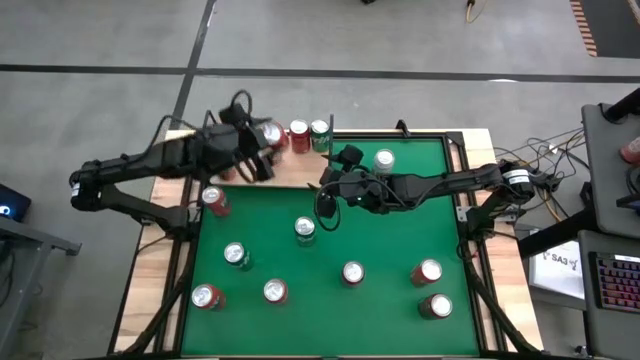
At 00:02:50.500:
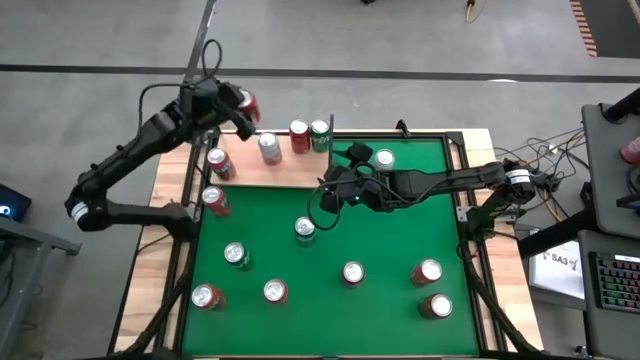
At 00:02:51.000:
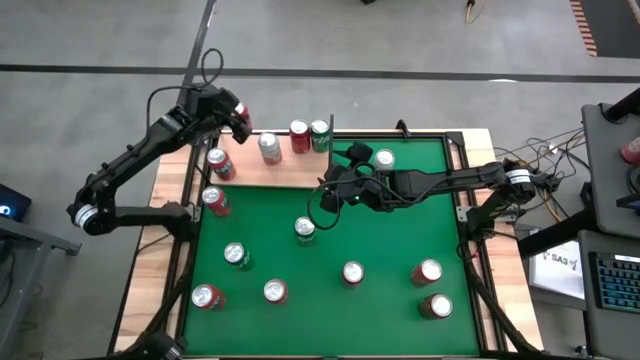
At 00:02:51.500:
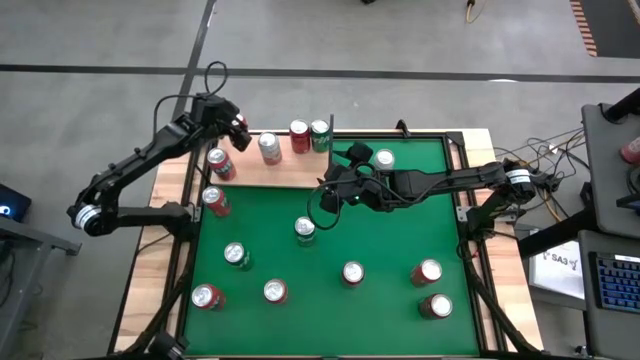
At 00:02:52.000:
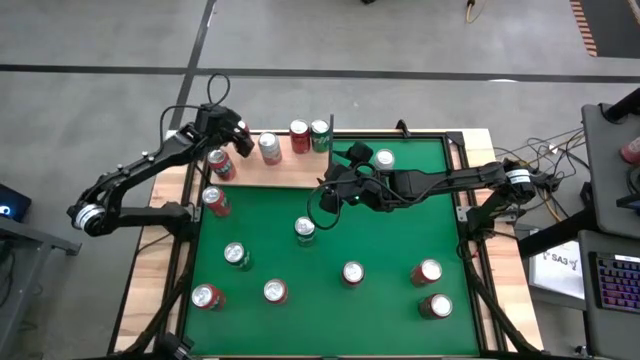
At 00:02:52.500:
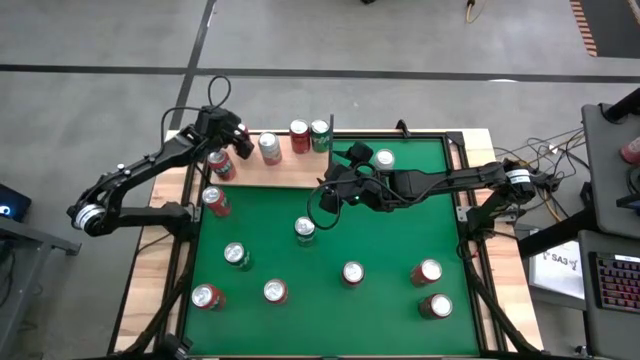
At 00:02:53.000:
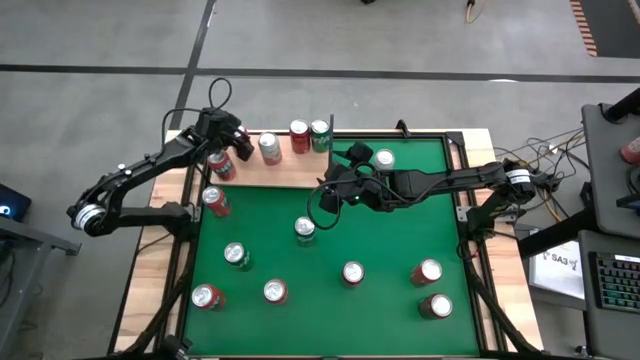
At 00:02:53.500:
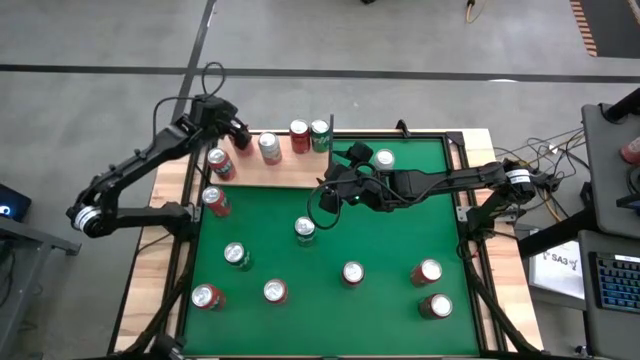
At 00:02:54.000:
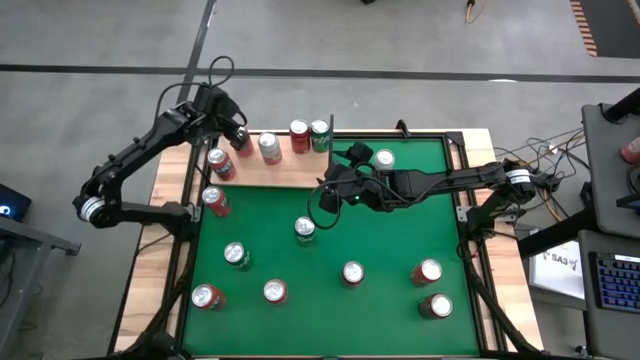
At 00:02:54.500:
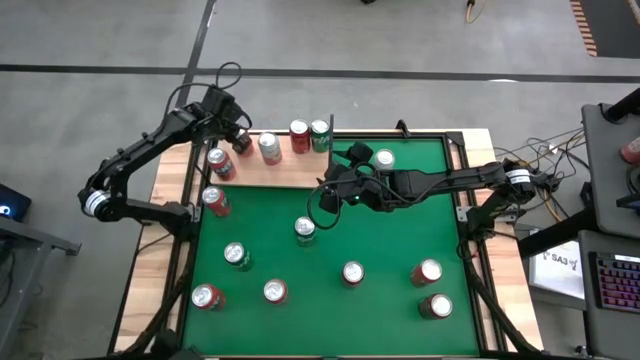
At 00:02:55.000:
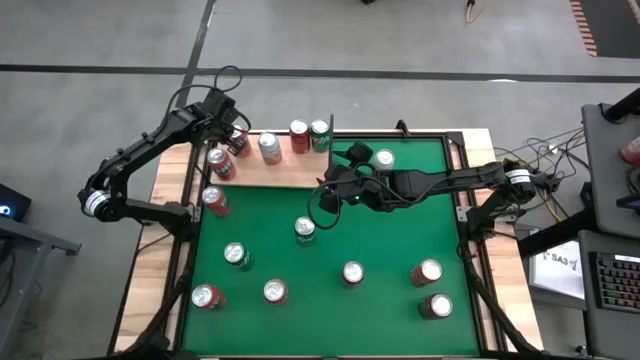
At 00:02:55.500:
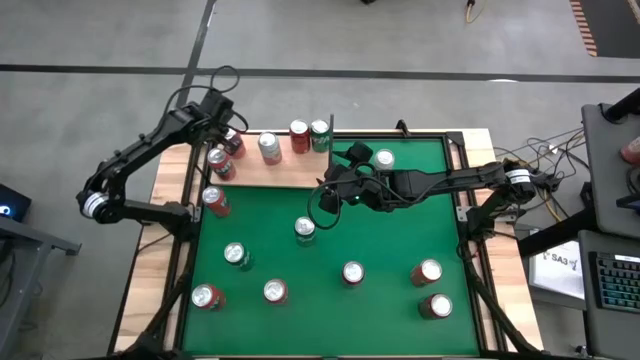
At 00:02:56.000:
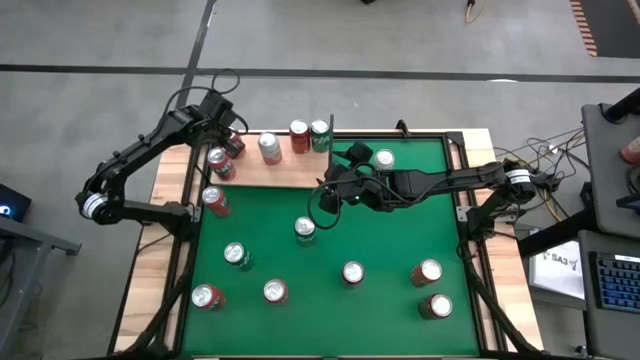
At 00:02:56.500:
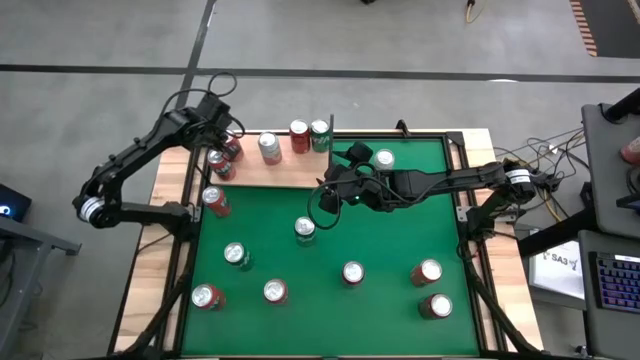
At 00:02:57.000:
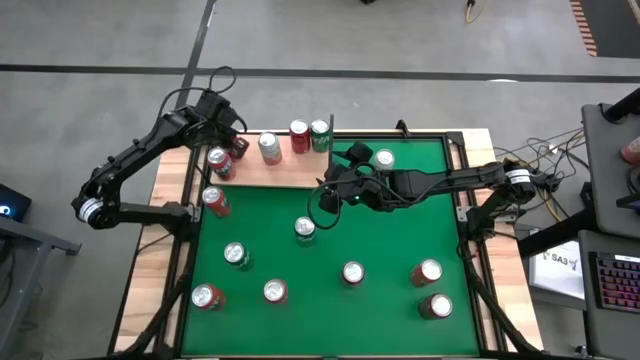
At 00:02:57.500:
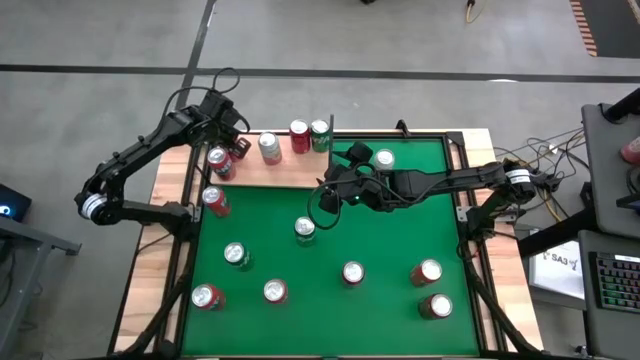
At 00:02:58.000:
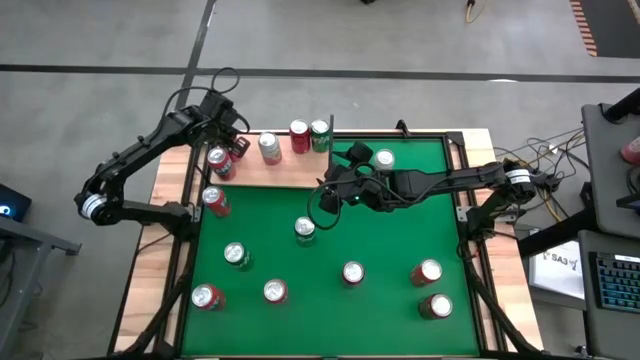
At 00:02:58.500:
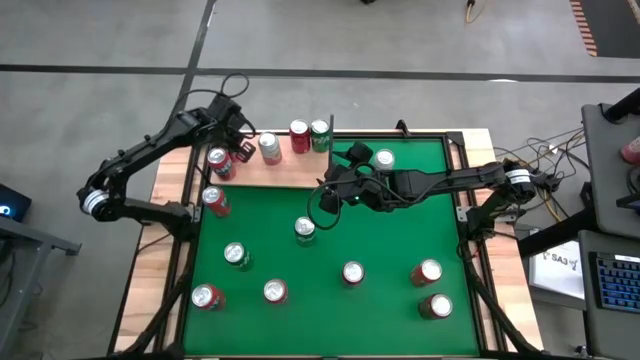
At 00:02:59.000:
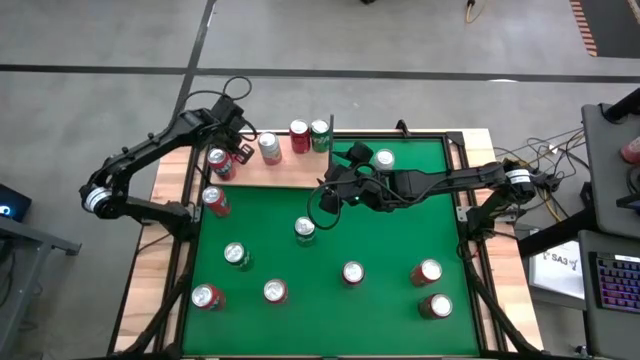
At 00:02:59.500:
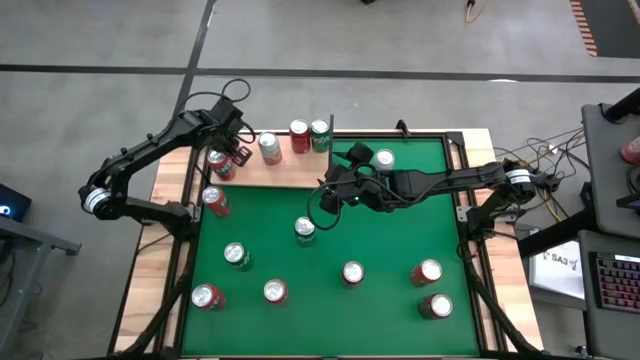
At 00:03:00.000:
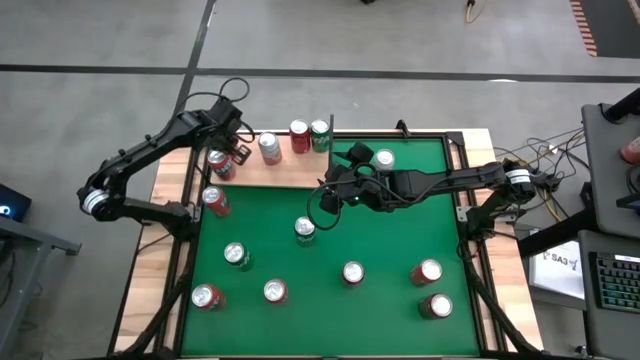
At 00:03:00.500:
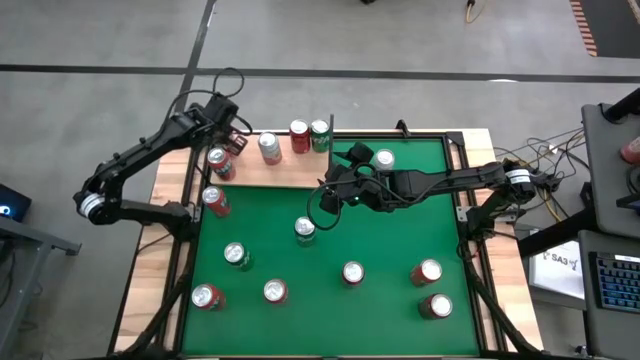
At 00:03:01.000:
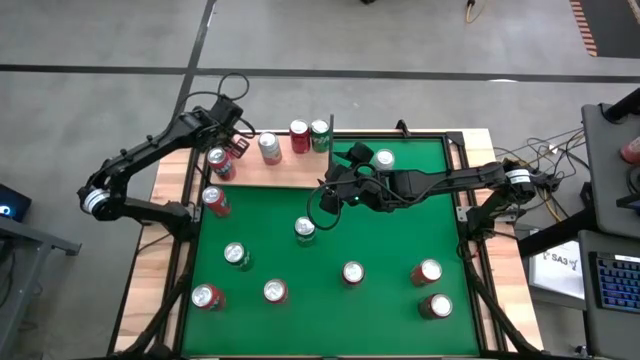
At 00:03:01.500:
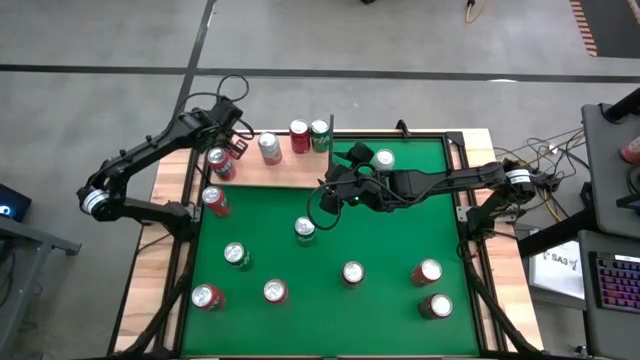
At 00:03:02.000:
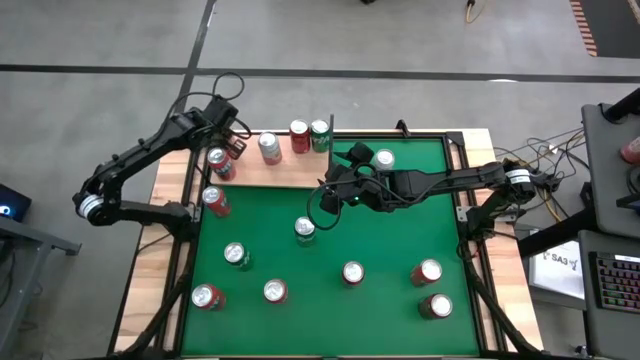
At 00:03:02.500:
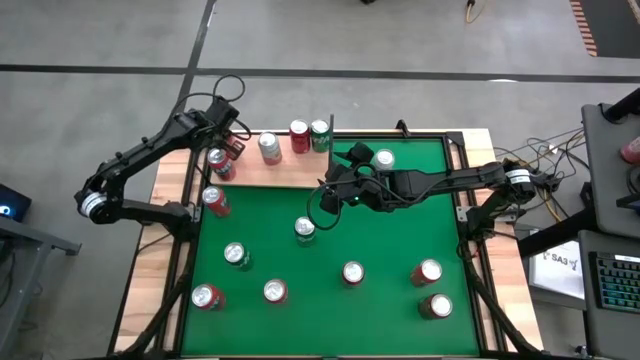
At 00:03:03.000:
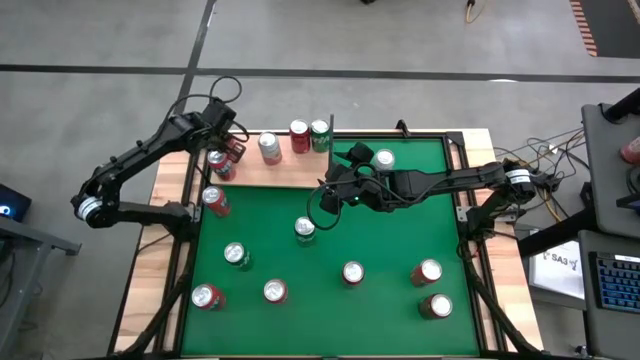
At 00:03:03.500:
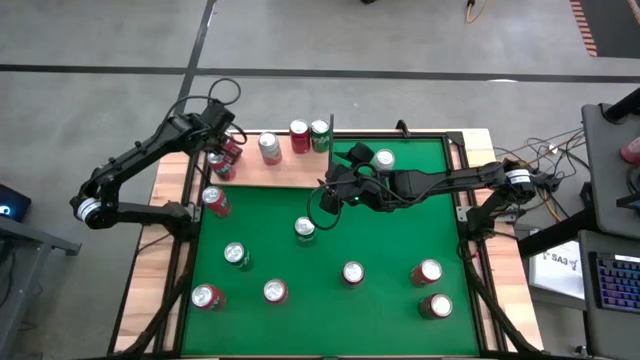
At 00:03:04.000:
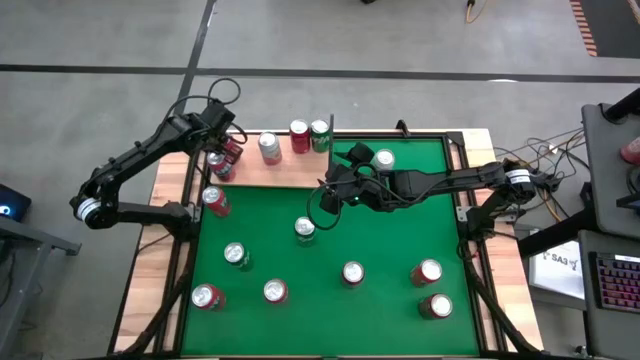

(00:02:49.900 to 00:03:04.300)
Task: Place canned beverage on shelf
Put the red soda can on the shelf aligned with the other red soda can

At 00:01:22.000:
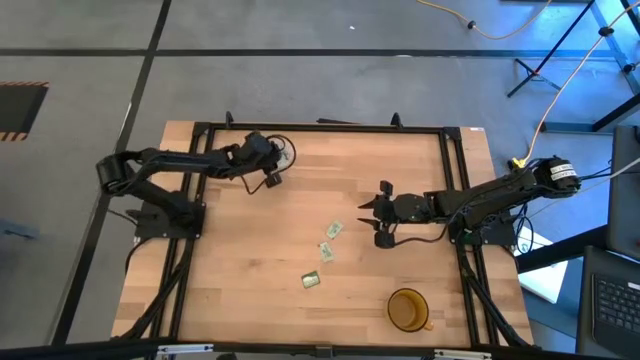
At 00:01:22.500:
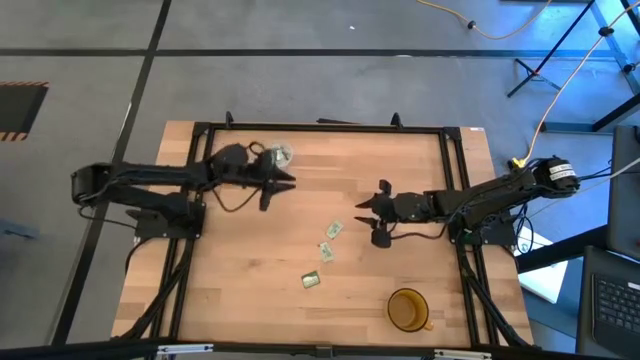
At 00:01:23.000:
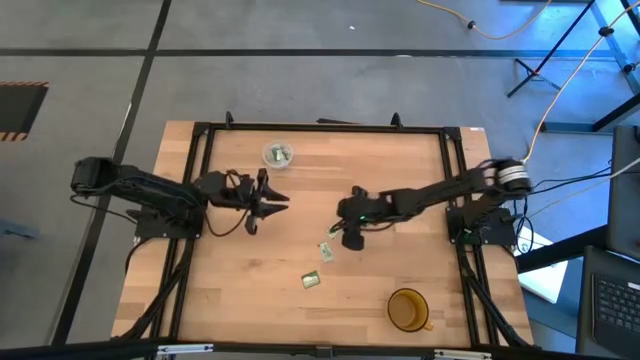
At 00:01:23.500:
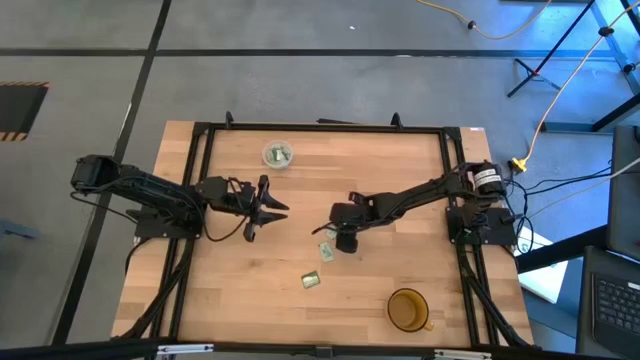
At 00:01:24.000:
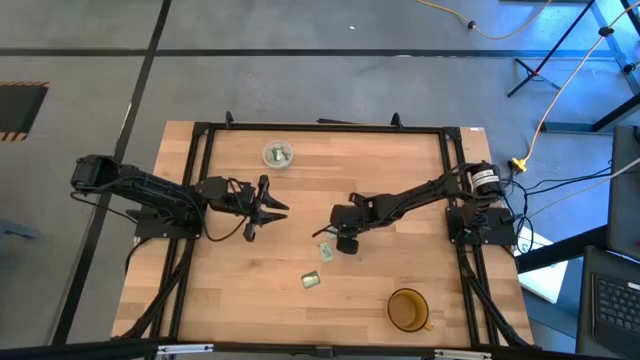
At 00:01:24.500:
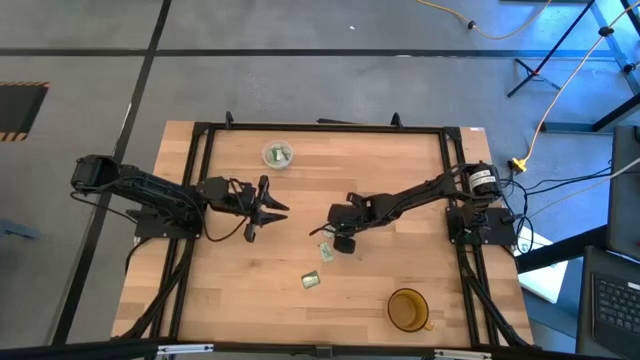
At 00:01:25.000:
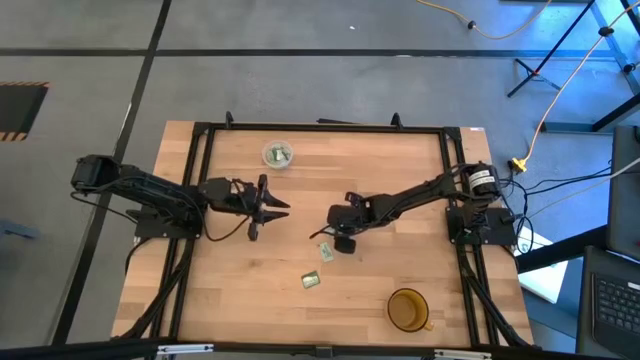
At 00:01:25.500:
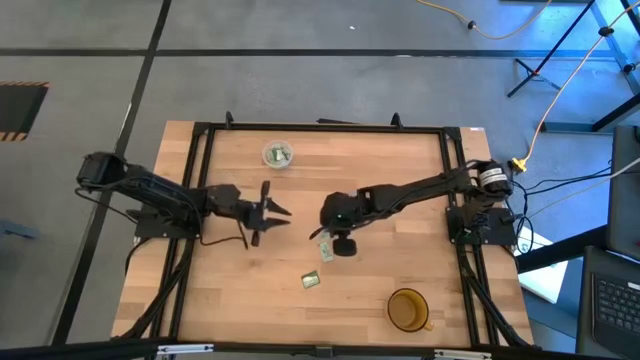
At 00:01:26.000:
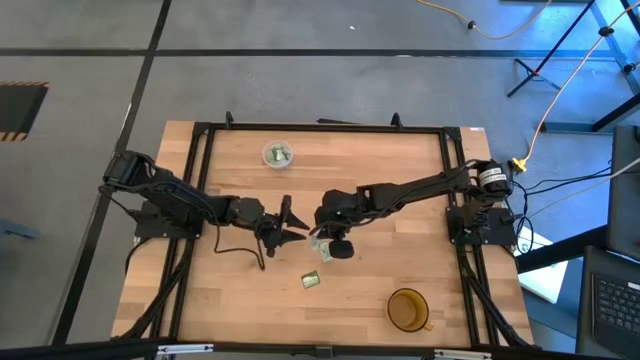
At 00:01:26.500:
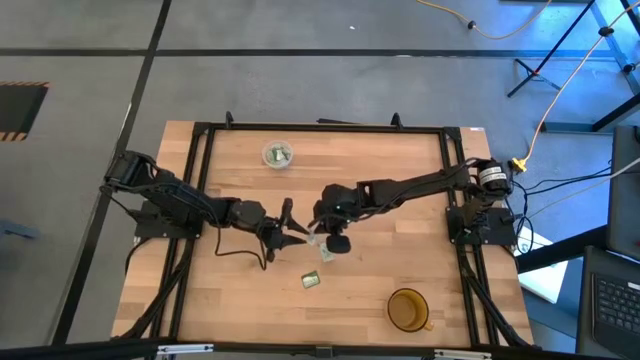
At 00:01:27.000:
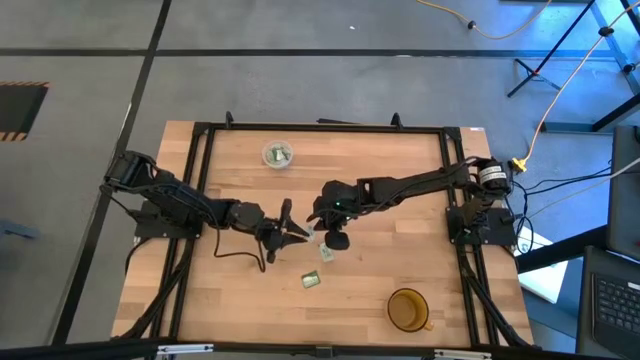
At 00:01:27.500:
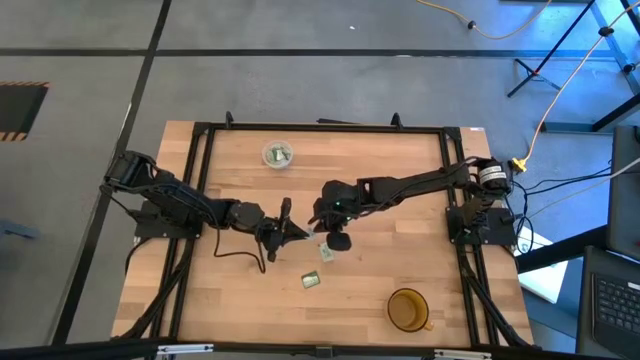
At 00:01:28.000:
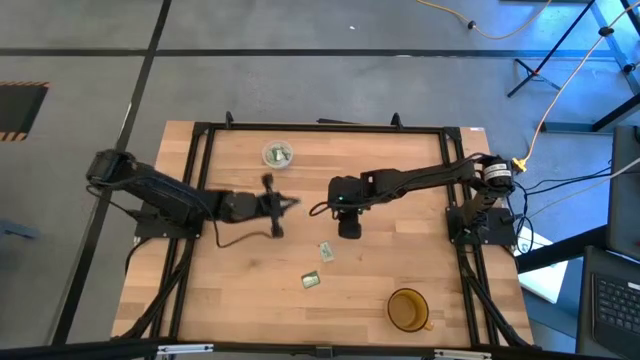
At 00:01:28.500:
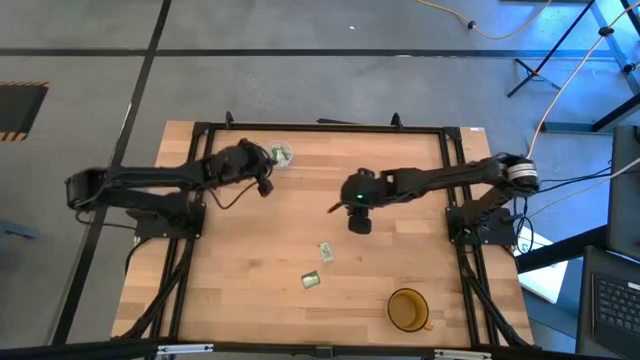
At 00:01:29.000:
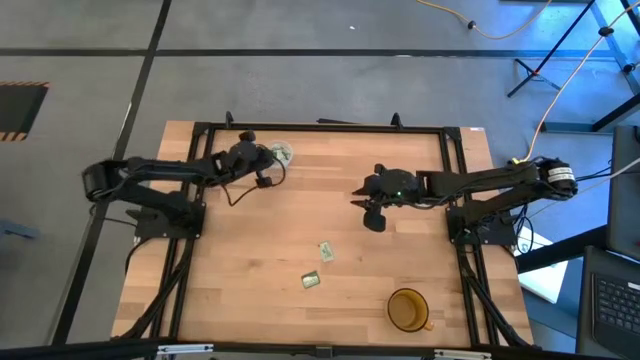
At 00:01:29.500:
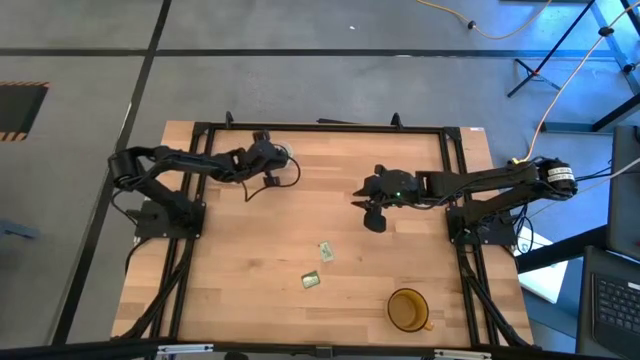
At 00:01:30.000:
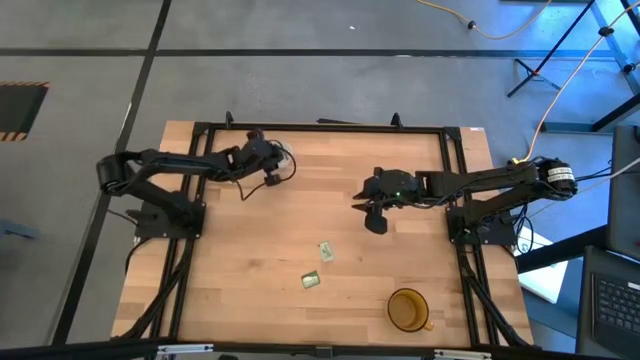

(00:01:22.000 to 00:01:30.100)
Task: Pick and place Stevia / Truvia into bins
Put the stevia packet into the transparent container
